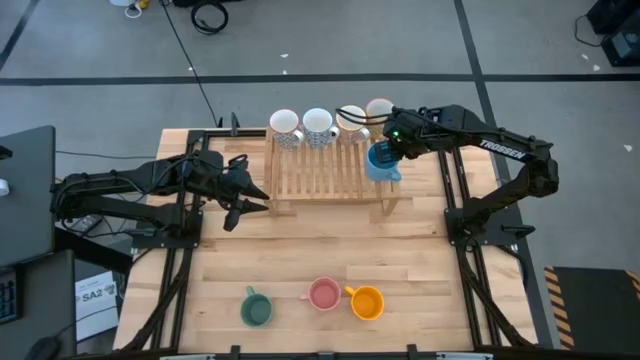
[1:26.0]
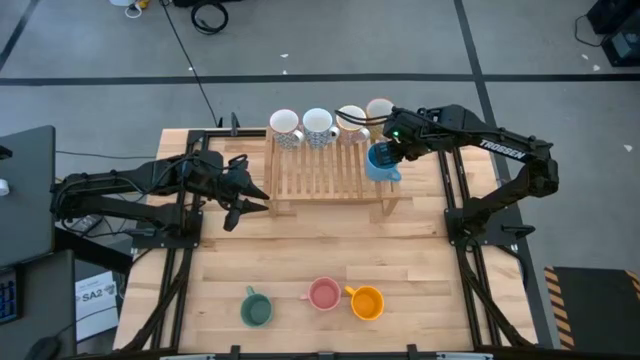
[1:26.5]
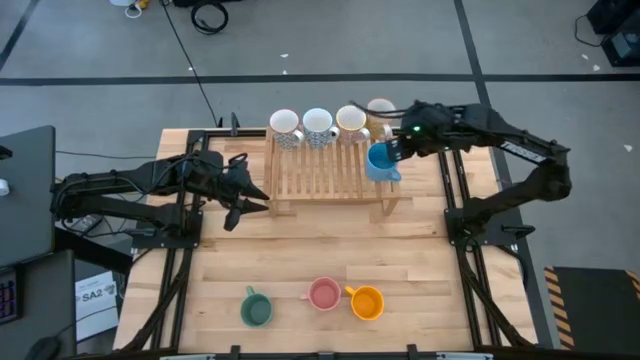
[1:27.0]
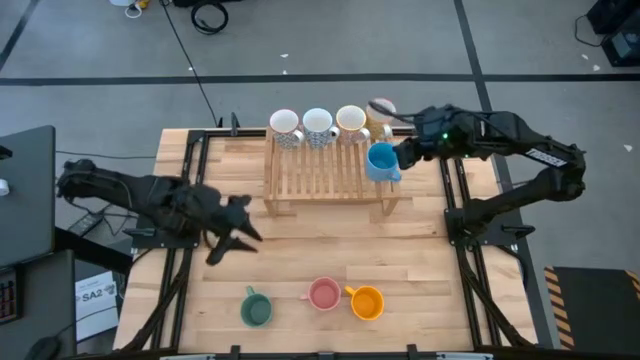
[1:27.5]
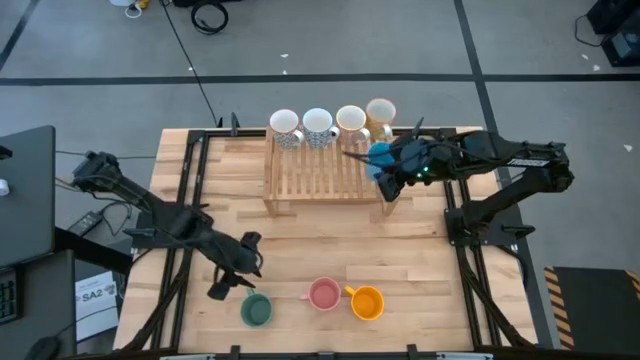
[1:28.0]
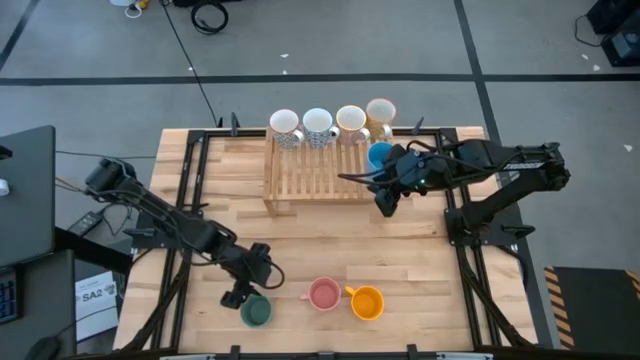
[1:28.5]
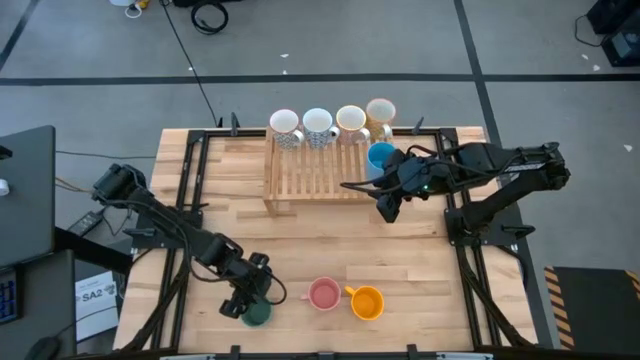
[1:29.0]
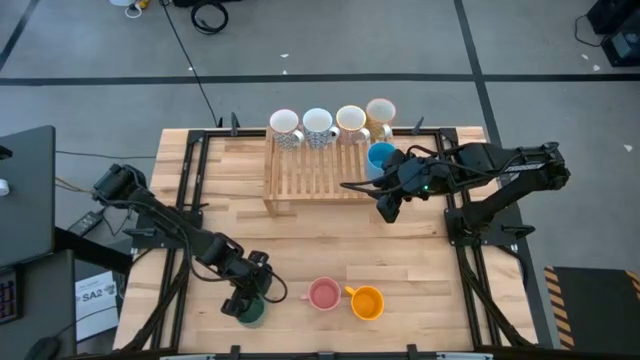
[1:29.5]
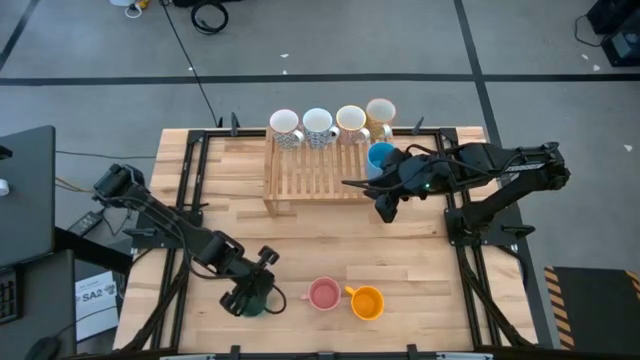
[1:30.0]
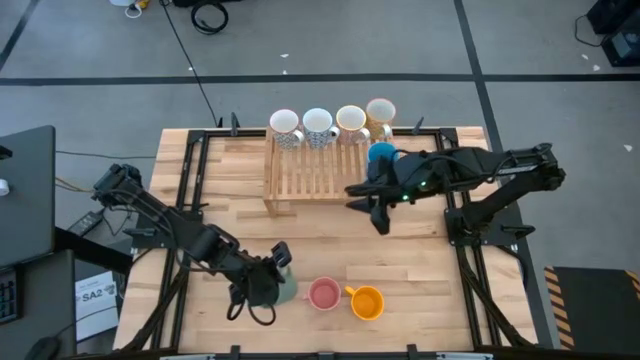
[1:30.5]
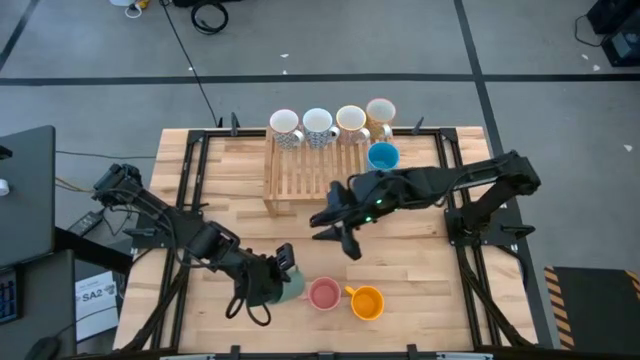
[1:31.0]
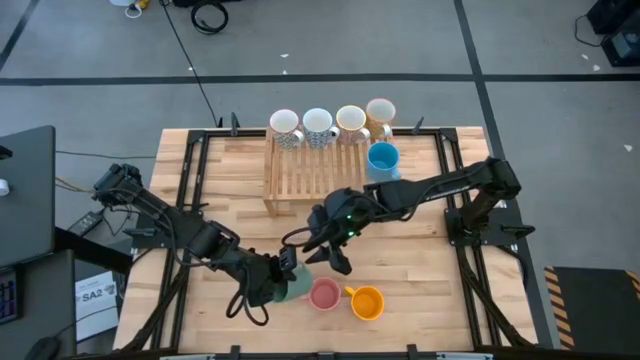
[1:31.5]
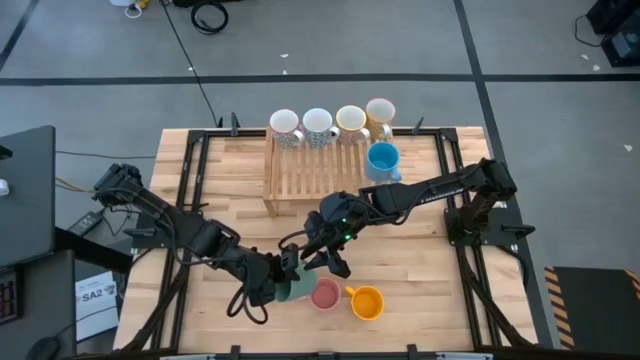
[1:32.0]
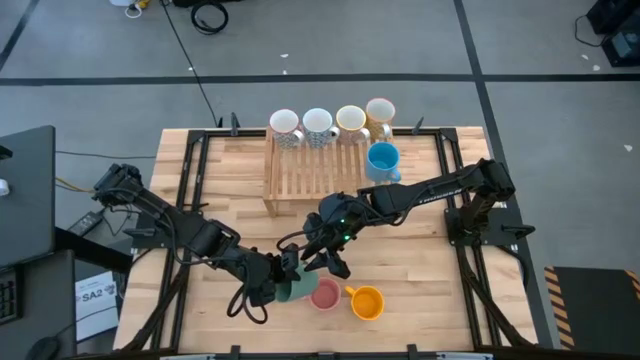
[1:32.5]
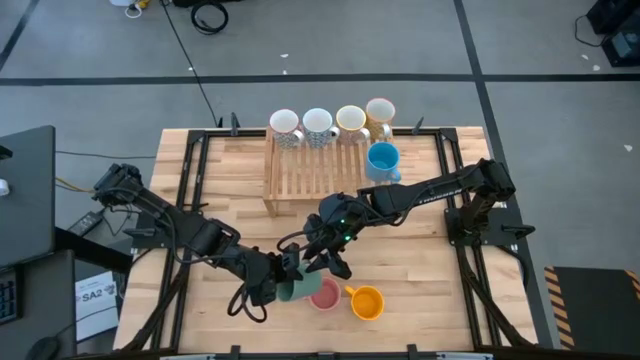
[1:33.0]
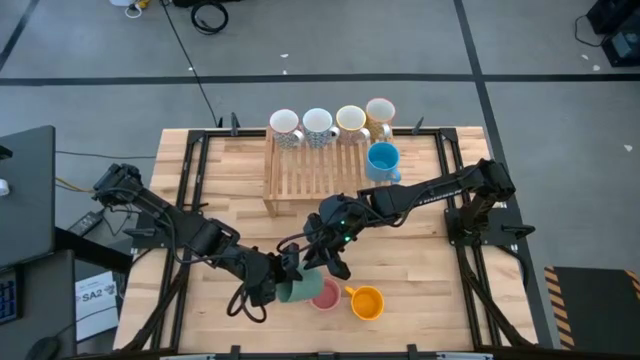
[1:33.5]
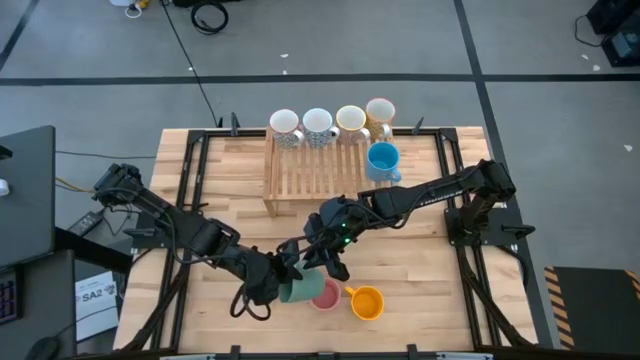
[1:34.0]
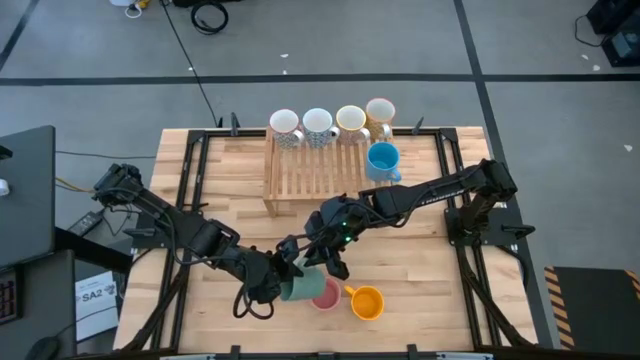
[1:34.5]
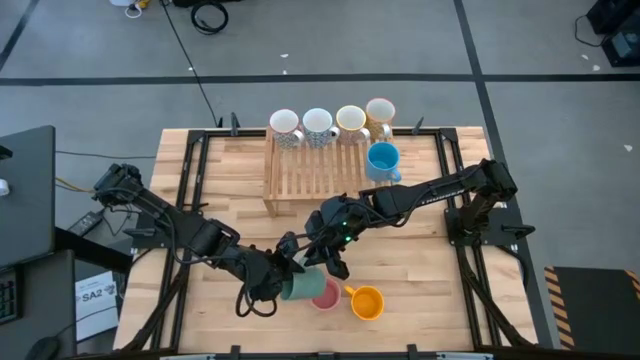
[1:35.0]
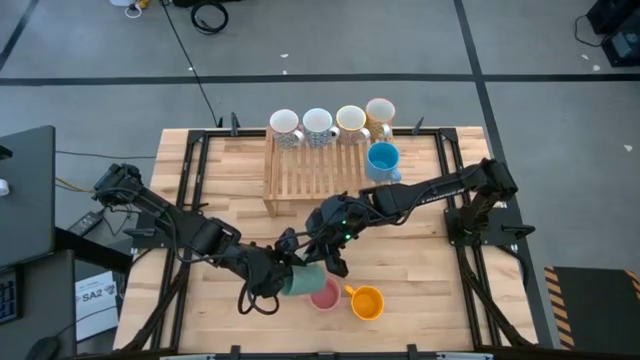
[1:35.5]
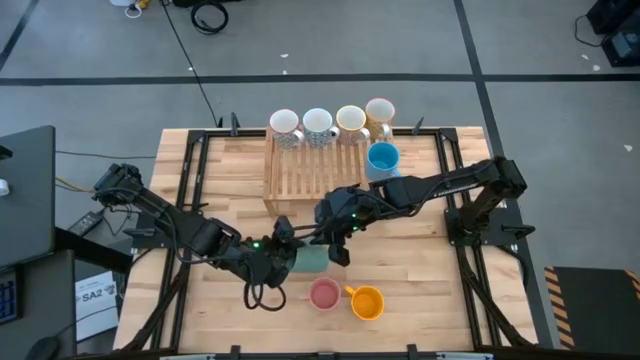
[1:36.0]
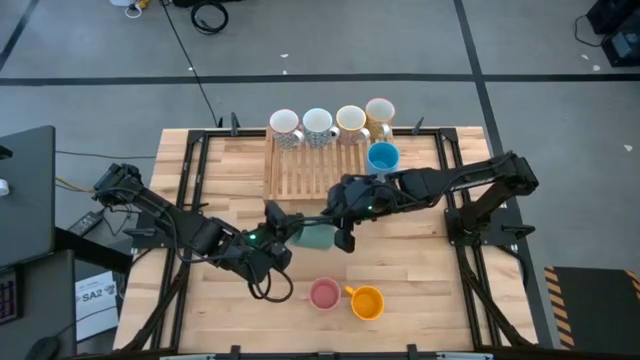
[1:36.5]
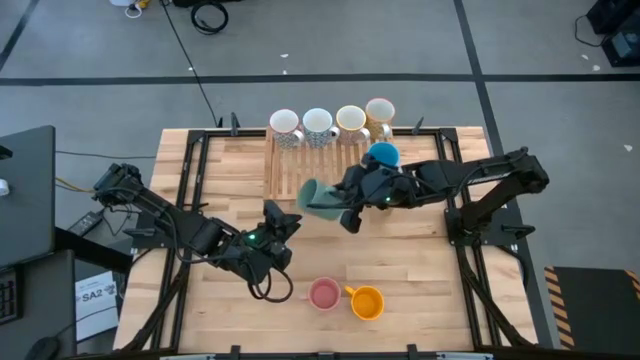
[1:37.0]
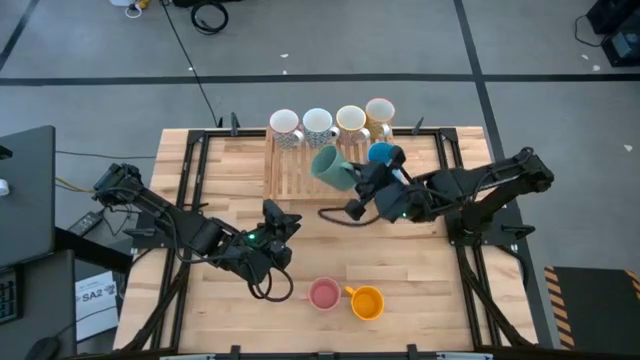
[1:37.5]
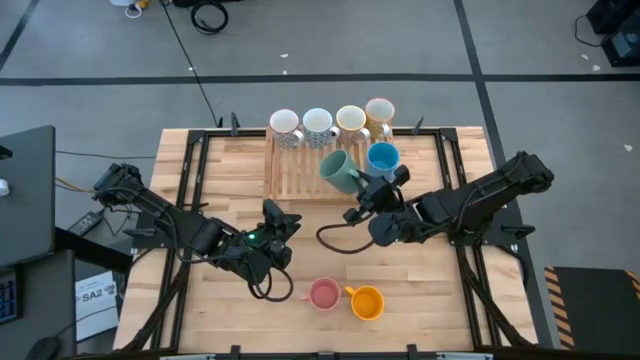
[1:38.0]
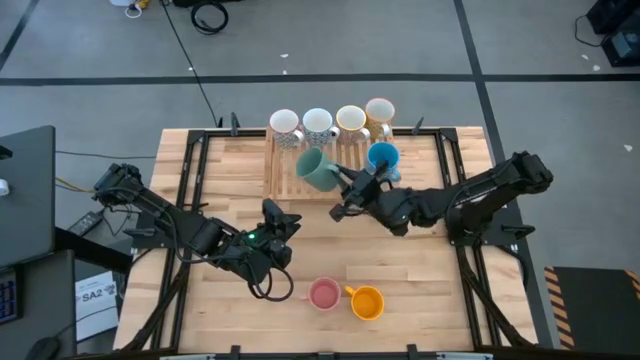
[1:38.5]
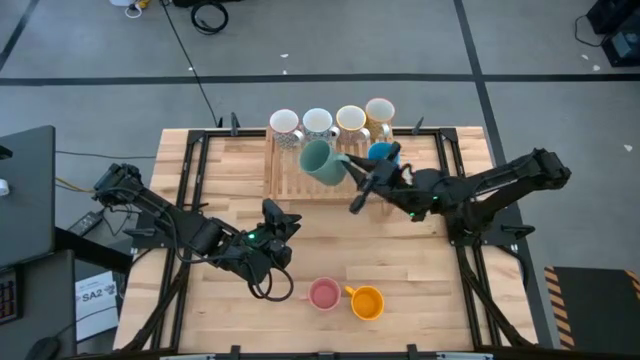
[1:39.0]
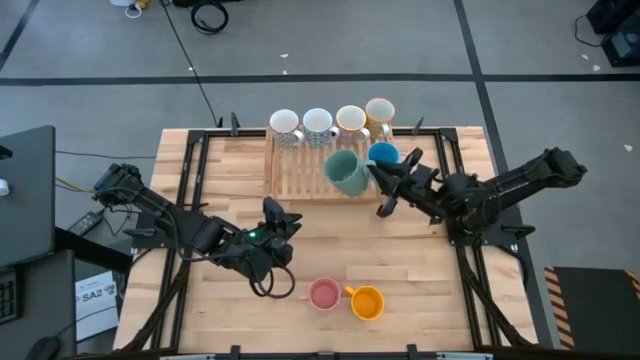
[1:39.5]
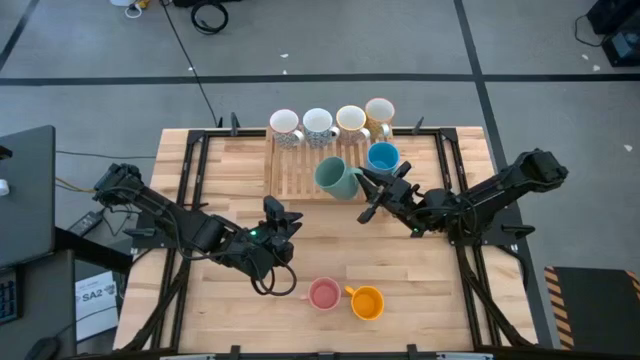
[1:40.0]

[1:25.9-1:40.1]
Task: Place coffee mugs
Put the green mug on the shelf aligned with the orange mug

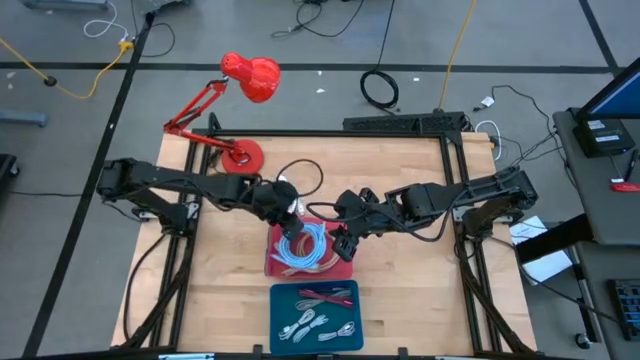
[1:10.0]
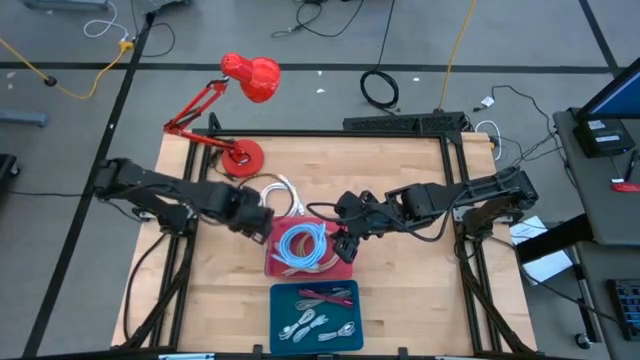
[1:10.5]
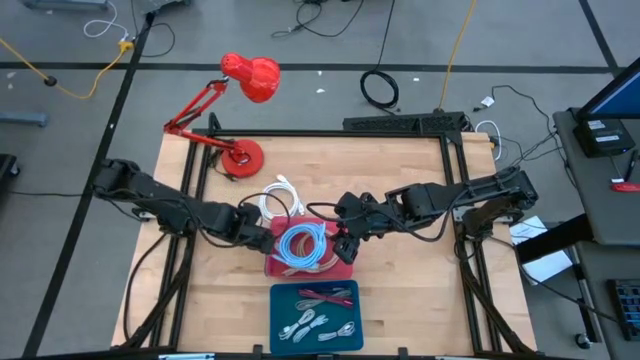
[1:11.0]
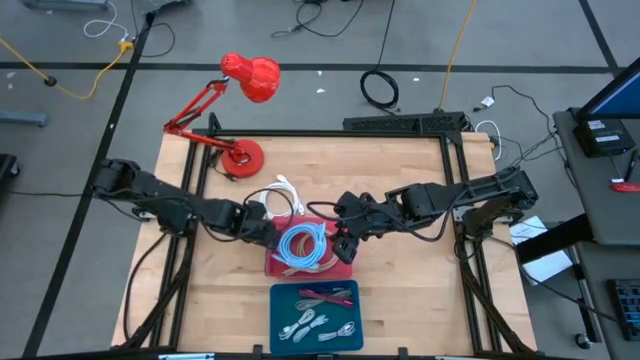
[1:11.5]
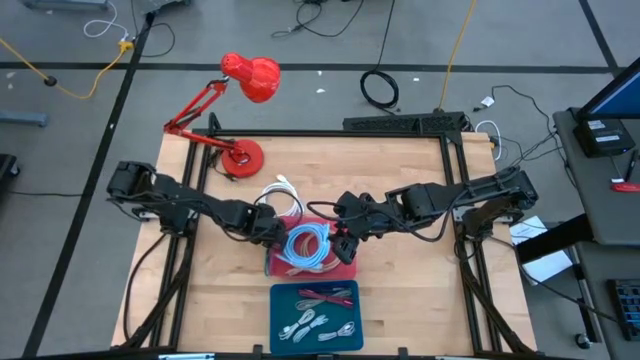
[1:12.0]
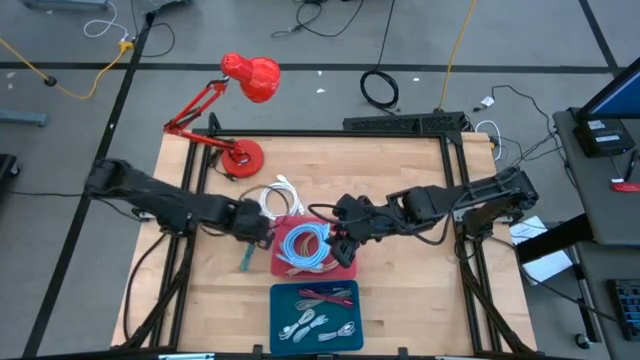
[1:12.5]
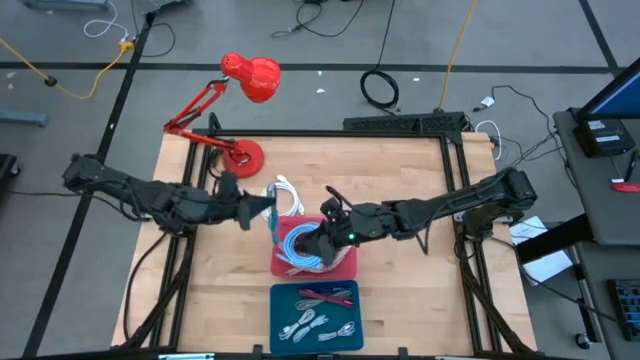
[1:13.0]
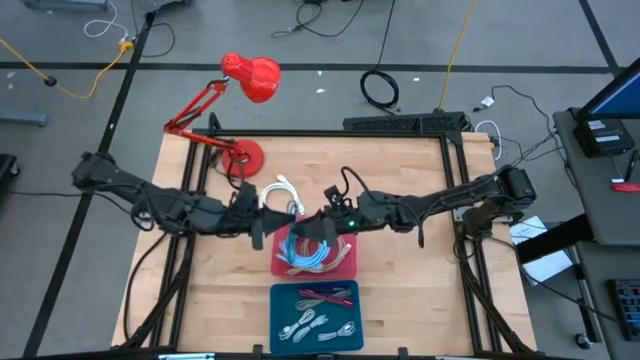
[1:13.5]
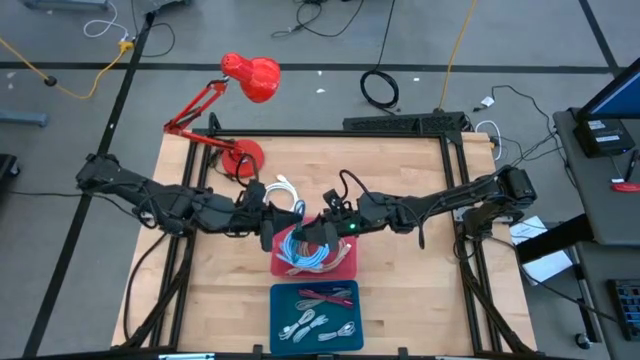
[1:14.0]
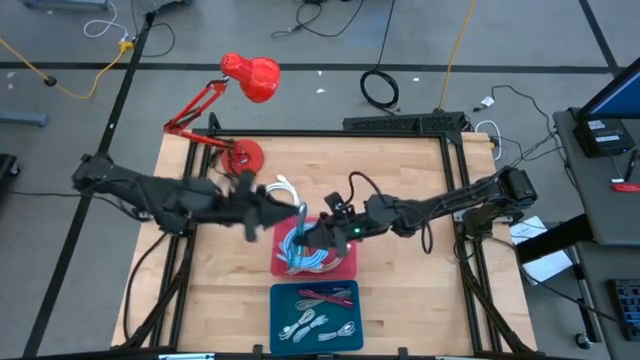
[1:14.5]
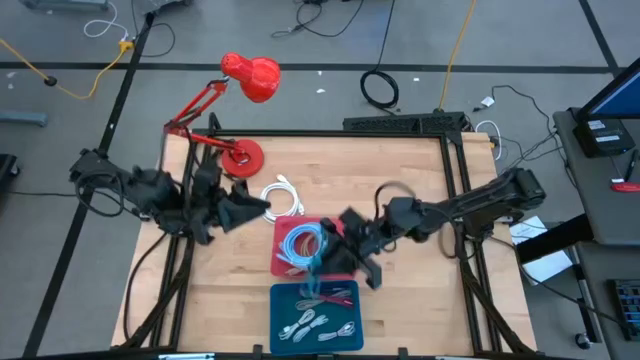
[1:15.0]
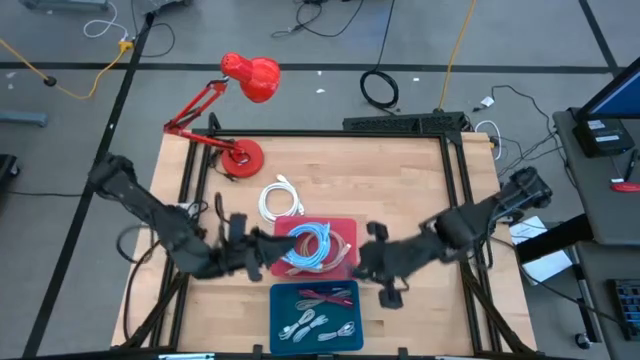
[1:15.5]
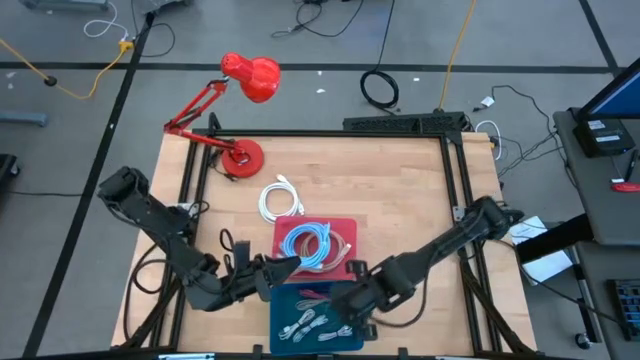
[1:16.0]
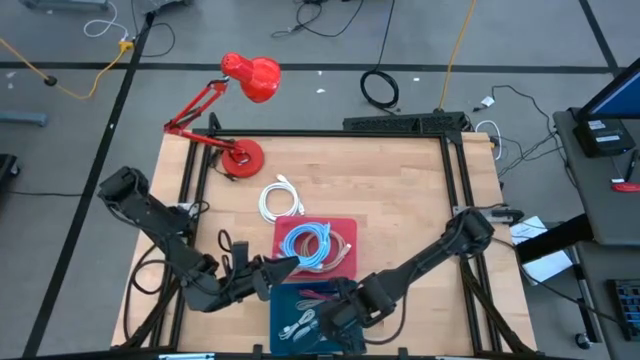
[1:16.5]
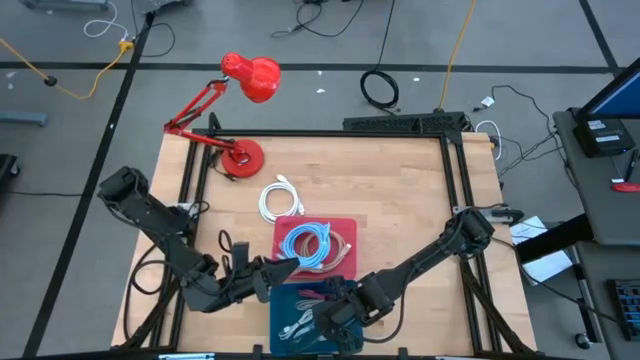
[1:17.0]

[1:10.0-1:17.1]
Task: Pick & Place USB Port
Put the blue and black charger cable into the blue bin
